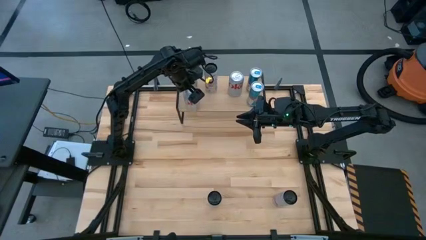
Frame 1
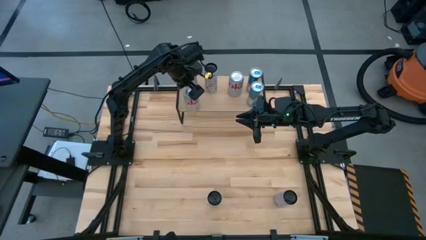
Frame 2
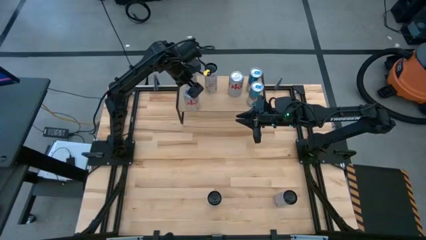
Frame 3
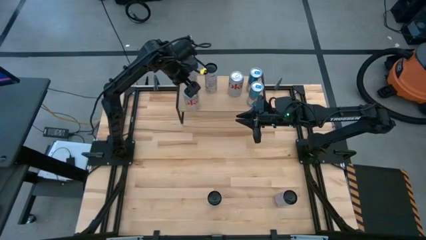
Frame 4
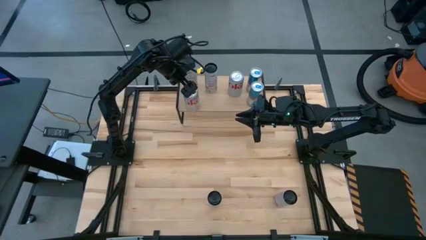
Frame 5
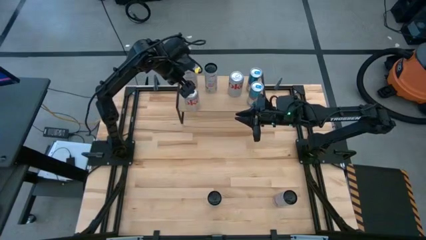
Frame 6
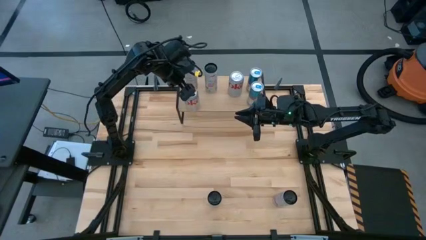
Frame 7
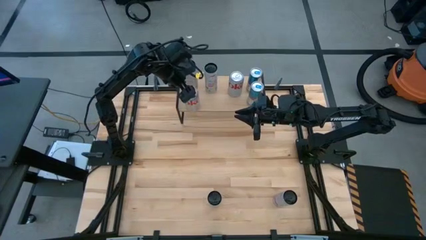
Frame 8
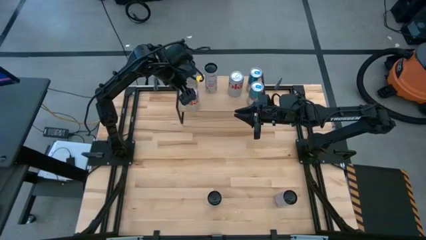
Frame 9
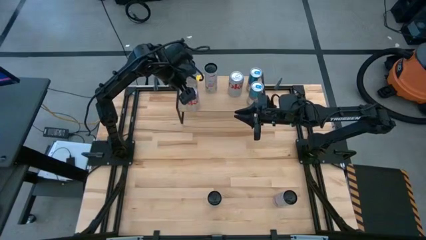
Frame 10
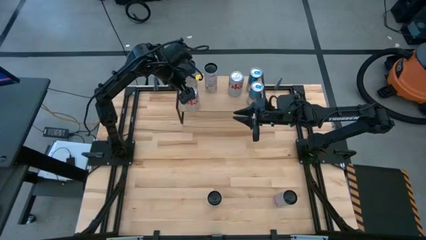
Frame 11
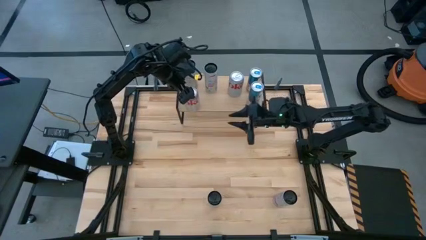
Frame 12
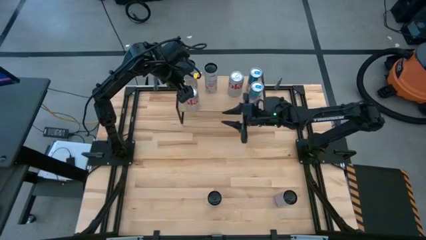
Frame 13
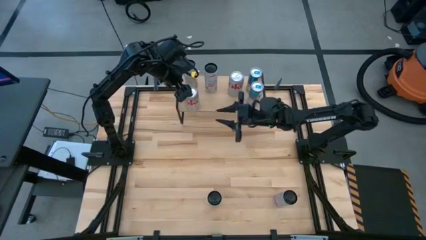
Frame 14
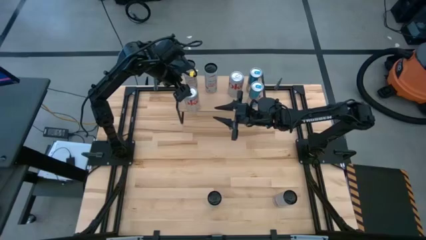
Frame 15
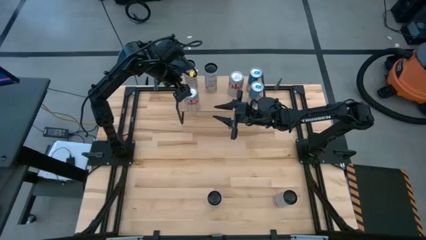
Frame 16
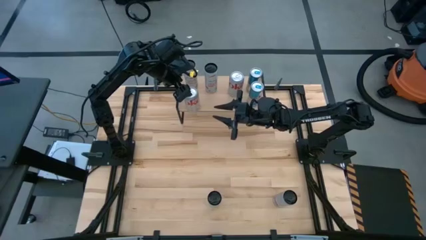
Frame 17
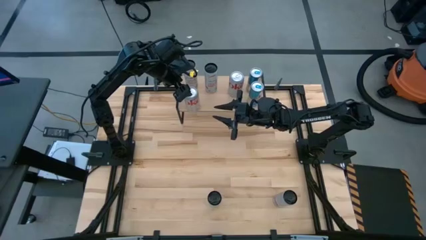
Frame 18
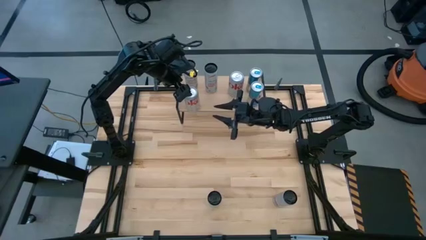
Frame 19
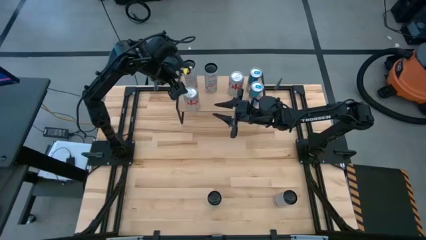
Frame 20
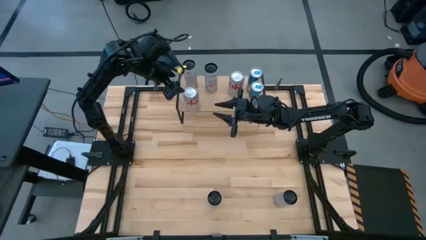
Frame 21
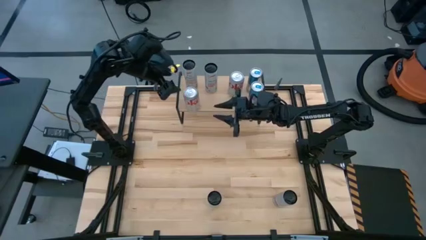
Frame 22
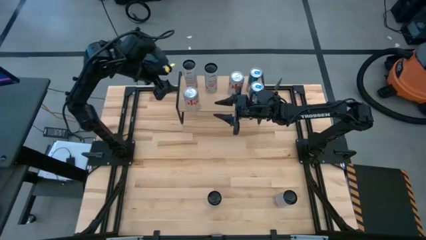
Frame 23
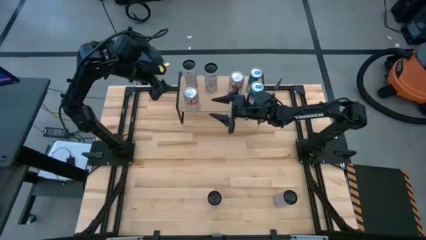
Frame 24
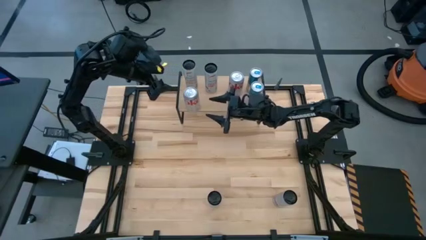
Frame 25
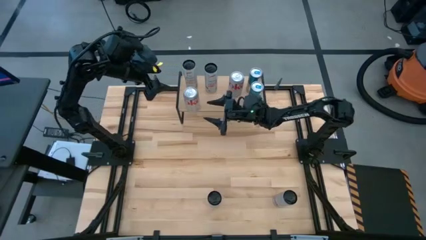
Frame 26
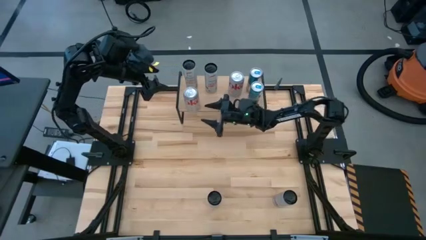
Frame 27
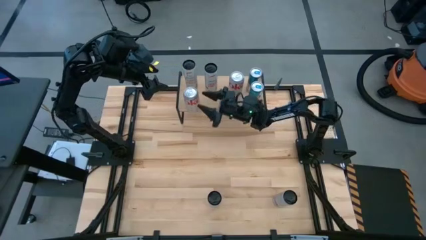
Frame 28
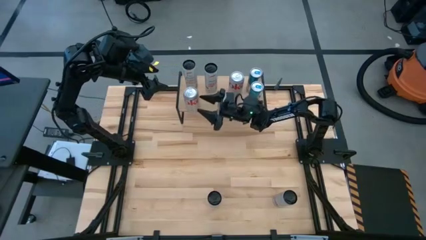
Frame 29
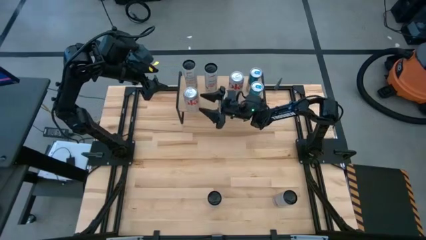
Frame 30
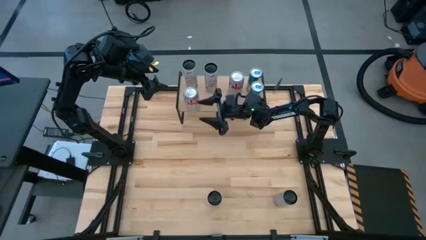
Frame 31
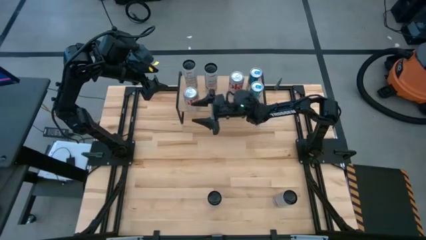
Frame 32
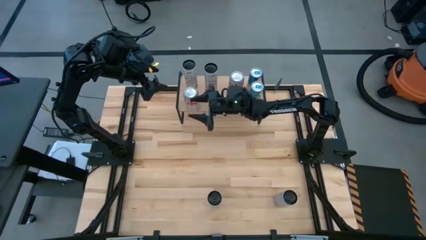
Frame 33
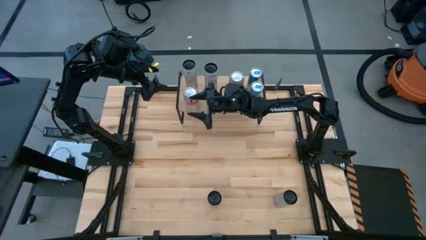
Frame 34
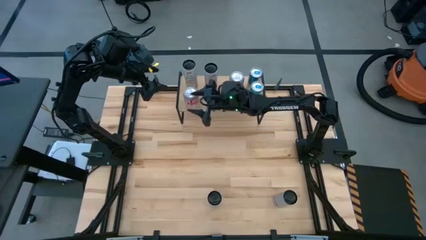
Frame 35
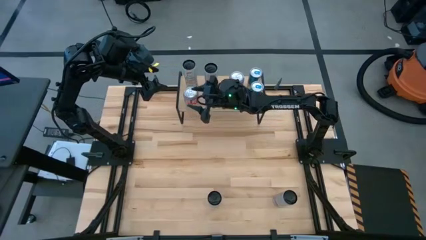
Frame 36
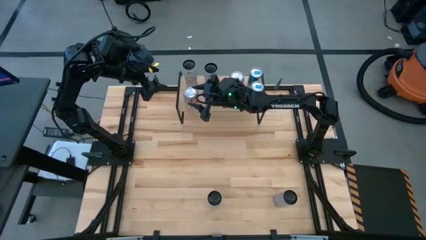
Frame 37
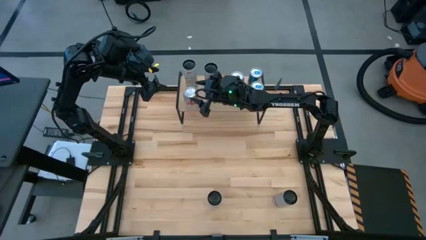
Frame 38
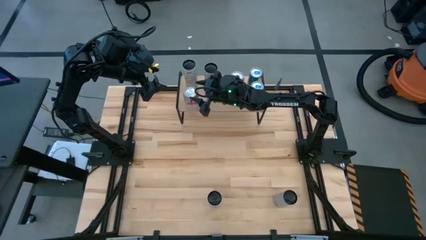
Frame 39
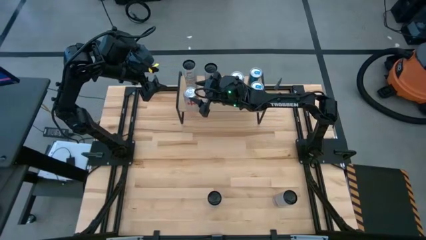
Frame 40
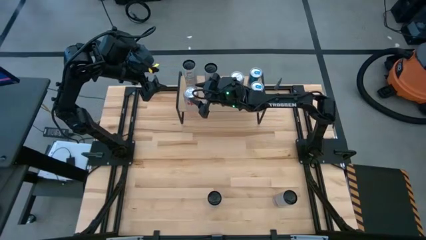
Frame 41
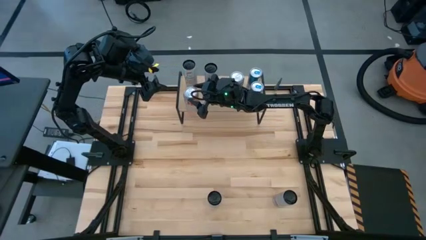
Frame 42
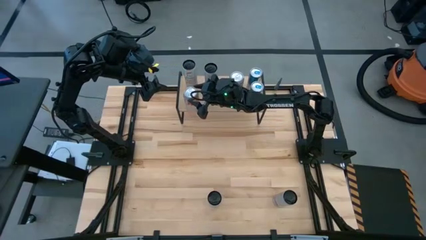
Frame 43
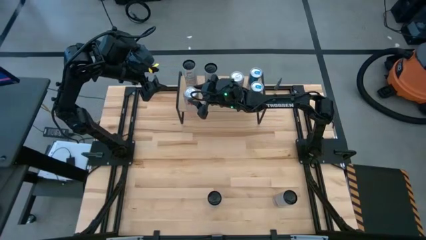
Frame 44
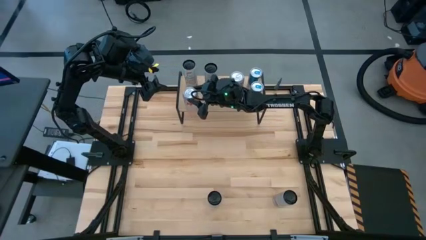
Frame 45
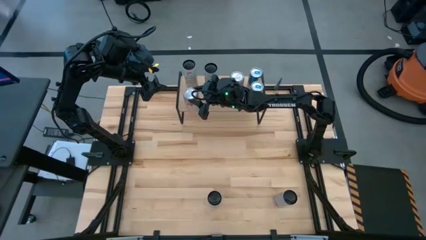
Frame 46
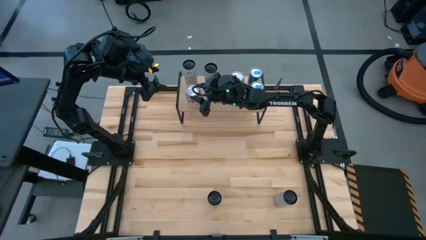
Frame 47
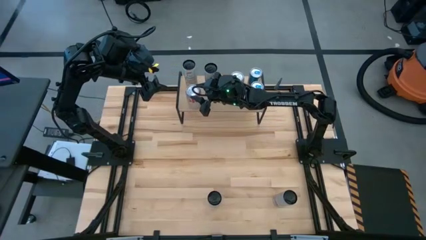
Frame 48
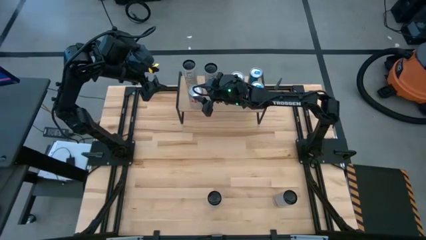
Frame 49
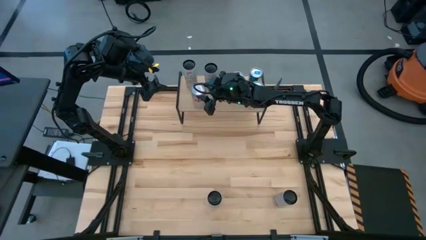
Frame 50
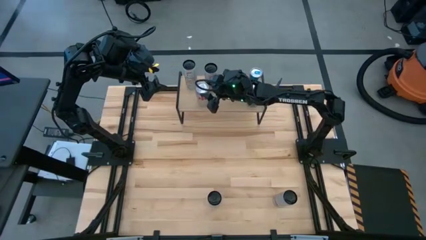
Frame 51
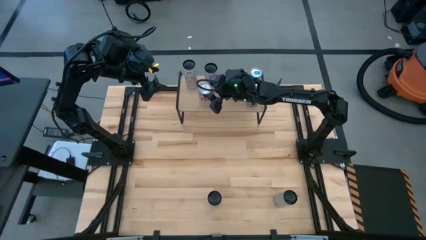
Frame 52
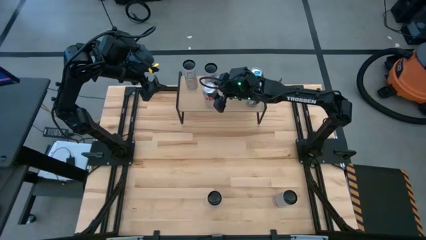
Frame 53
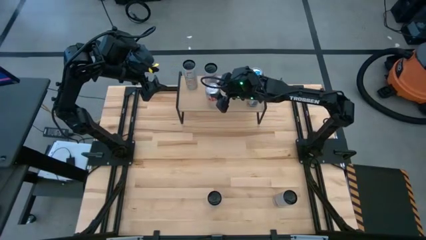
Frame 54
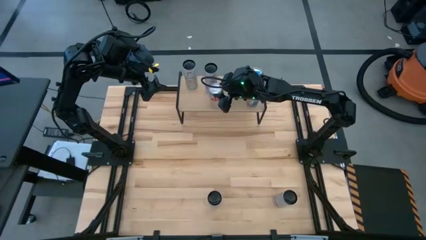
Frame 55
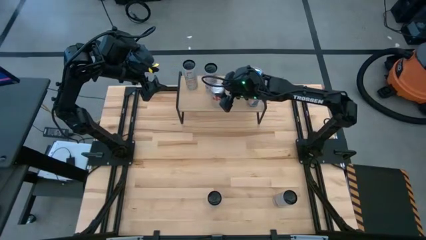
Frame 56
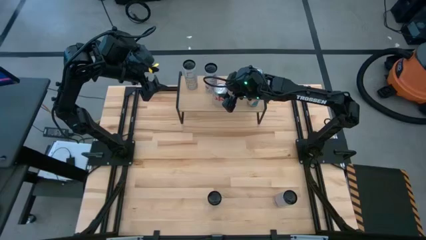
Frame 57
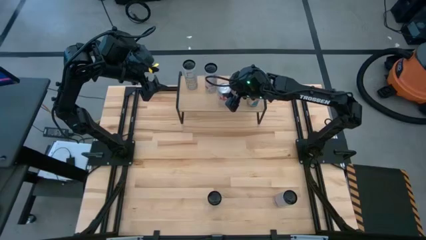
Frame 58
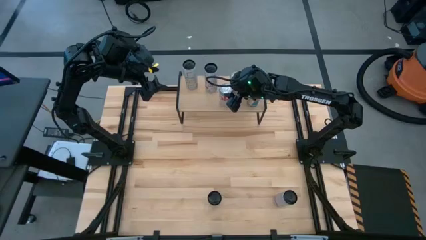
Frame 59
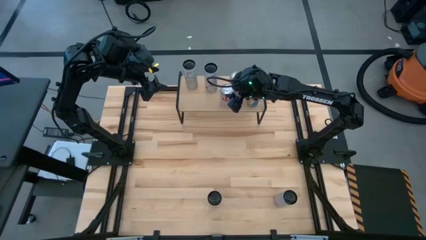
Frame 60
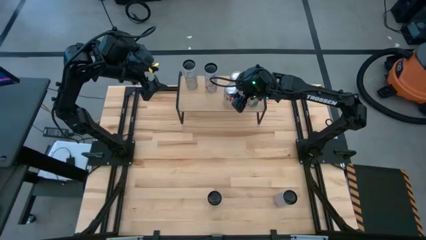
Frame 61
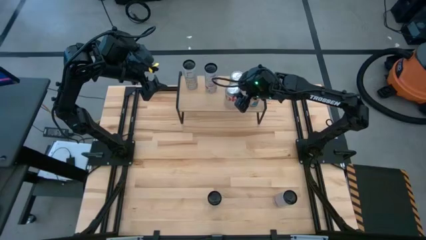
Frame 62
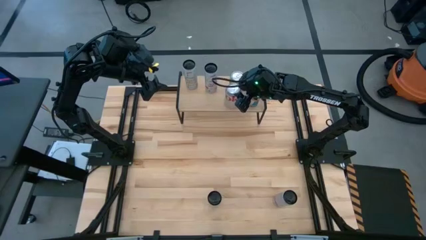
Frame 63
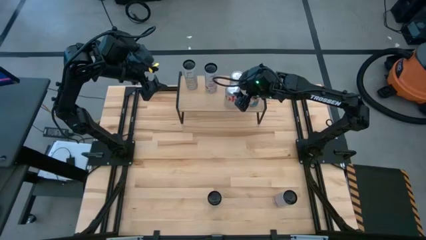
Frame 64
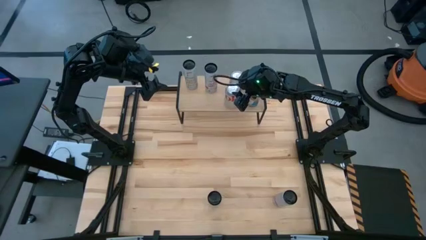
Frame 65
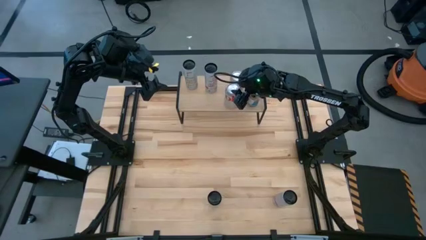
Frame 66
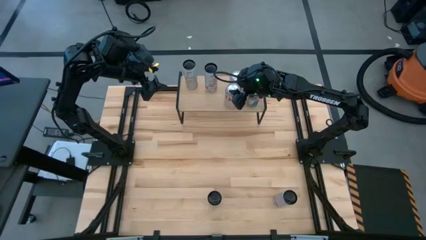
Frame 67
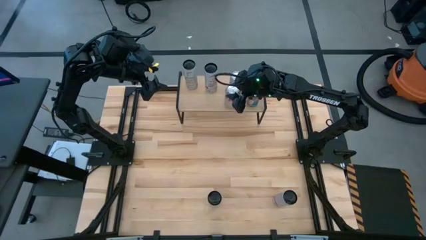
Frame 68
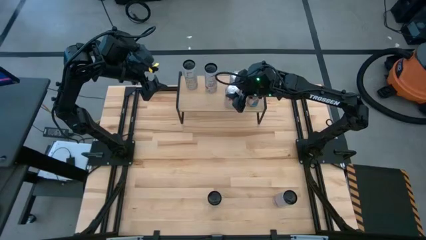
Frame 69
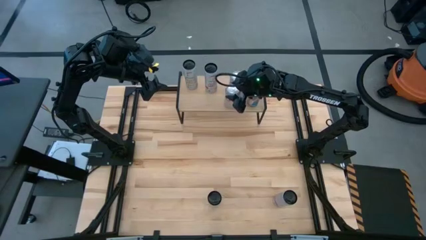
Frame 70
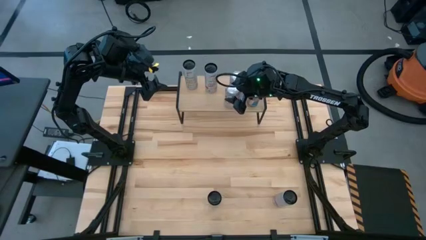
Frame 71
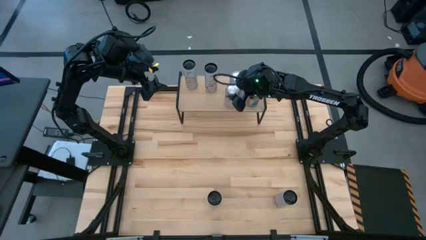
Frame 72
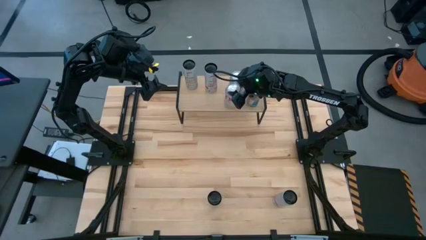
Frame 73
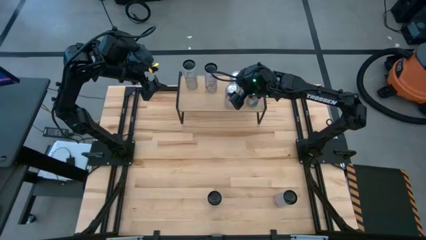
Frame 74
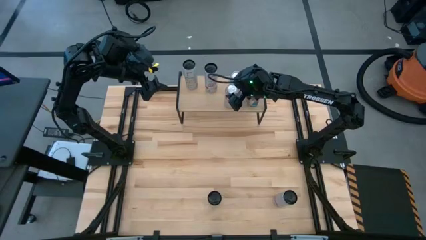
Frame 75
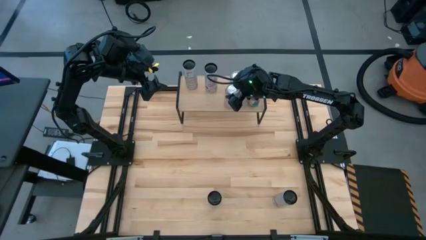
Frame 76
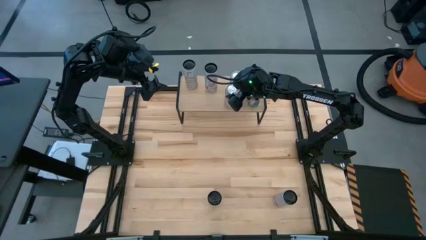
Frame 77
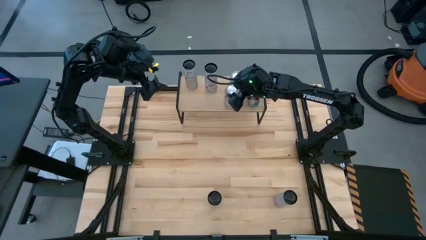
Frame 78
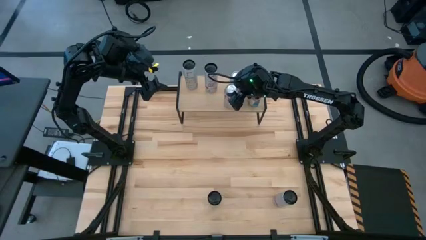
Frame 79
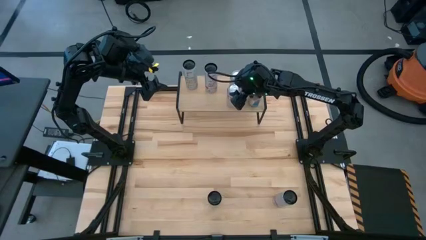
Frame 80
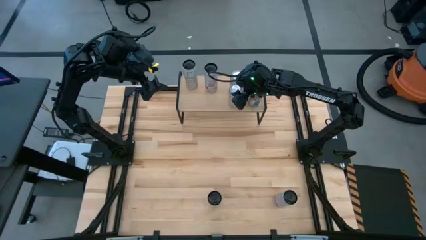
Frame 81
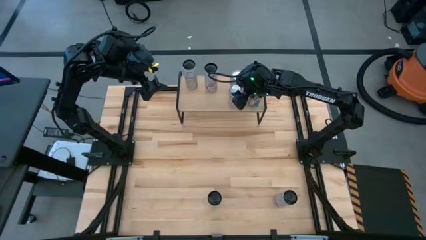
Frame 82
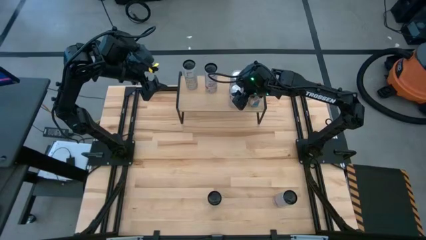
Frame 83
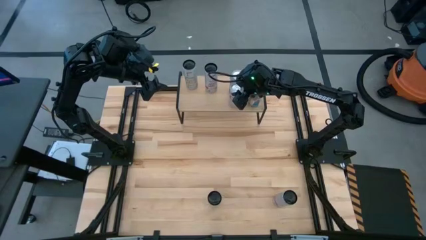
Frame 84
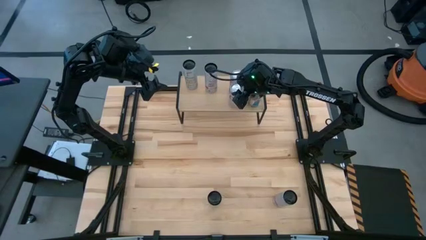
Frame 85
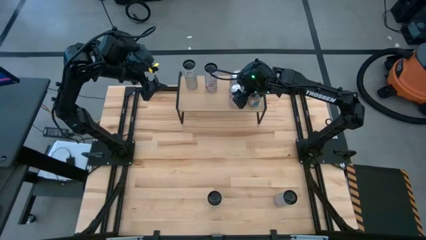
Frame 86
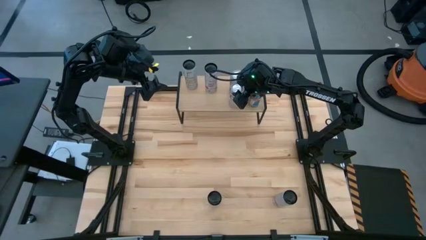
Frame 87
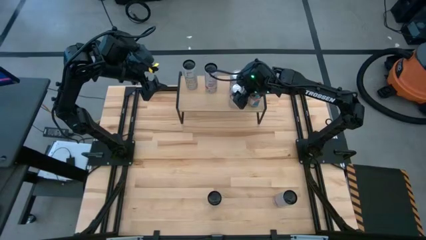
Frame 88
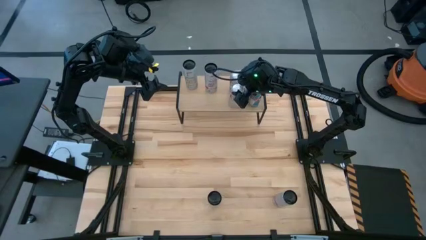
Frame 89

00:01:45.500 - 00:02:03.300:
Task: Place canned beverage on shelf
Put the red soda can aligned with the other red soda can on the shelf
